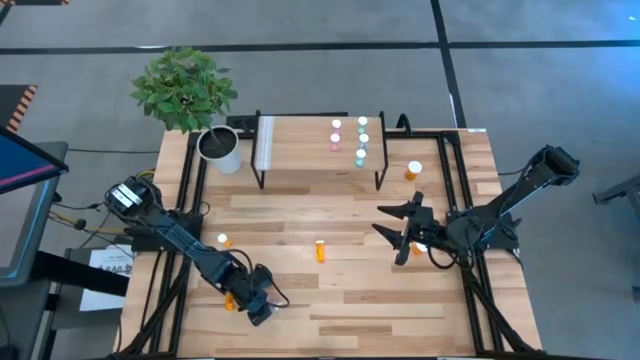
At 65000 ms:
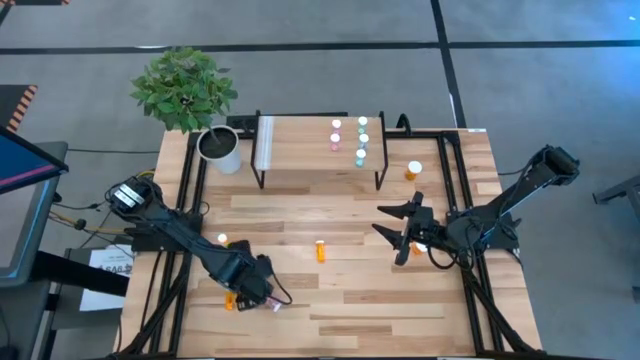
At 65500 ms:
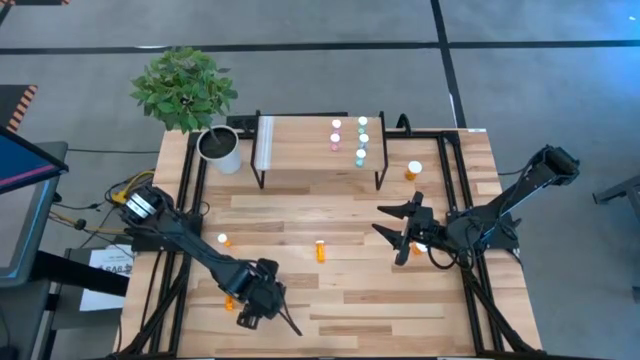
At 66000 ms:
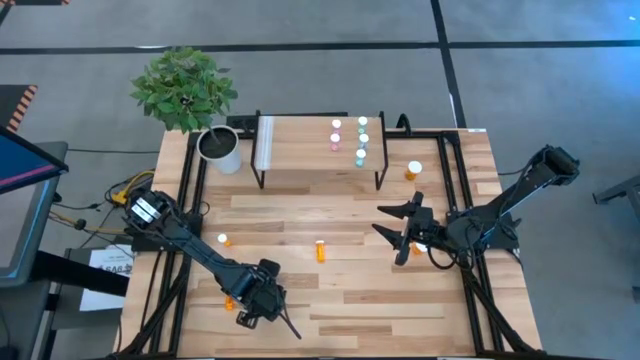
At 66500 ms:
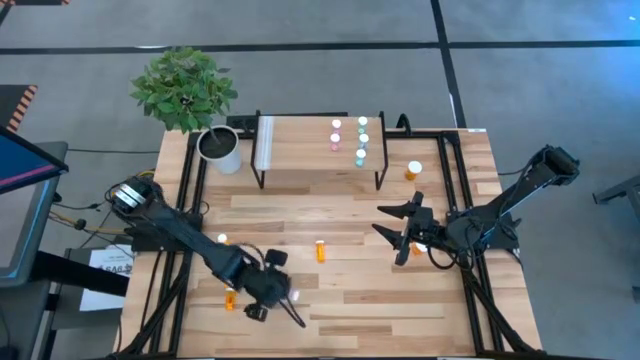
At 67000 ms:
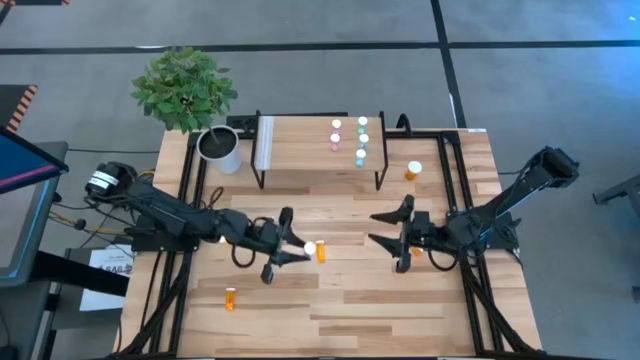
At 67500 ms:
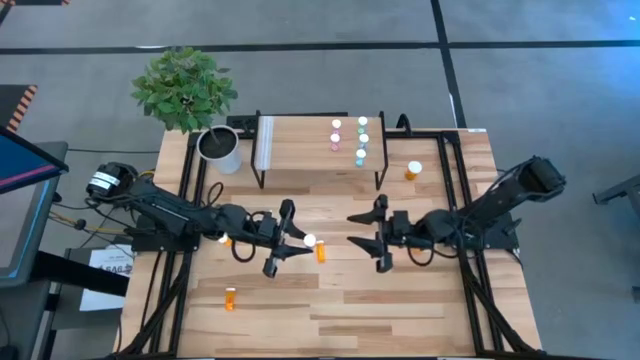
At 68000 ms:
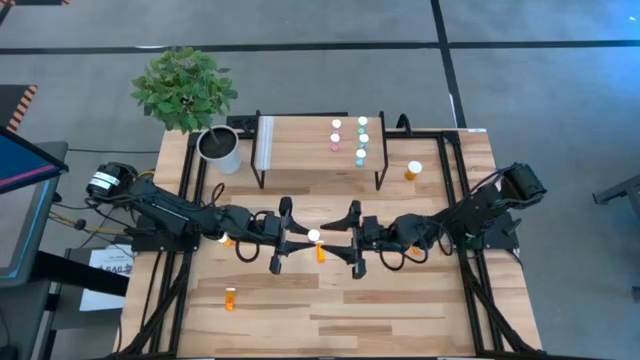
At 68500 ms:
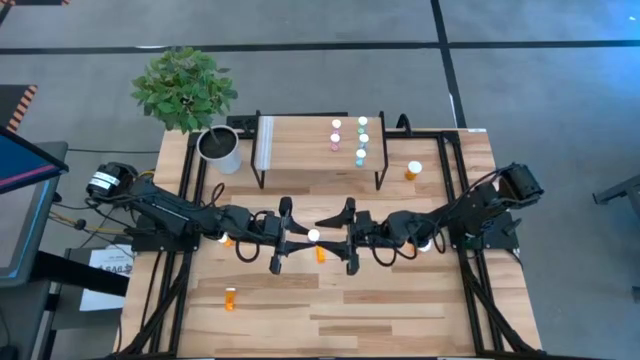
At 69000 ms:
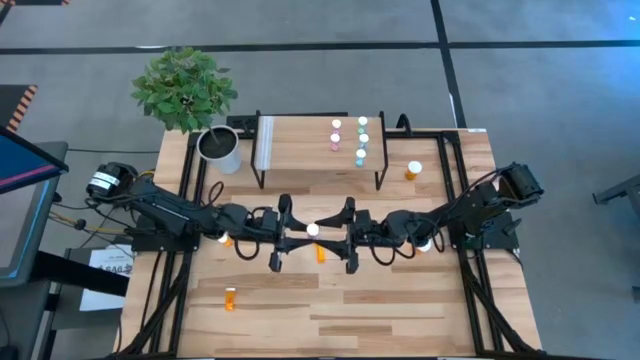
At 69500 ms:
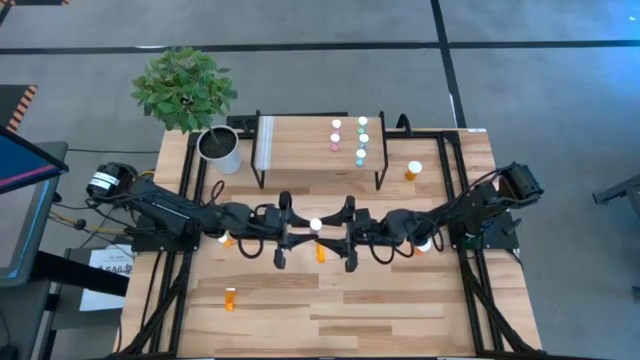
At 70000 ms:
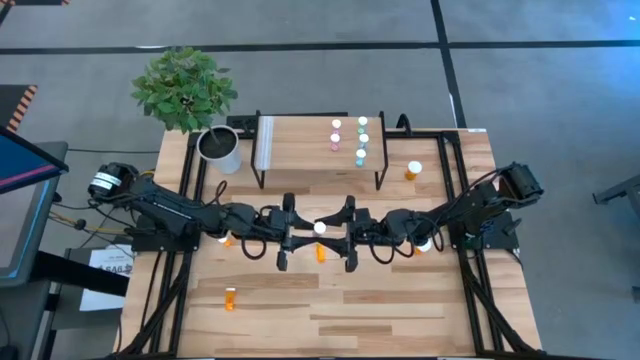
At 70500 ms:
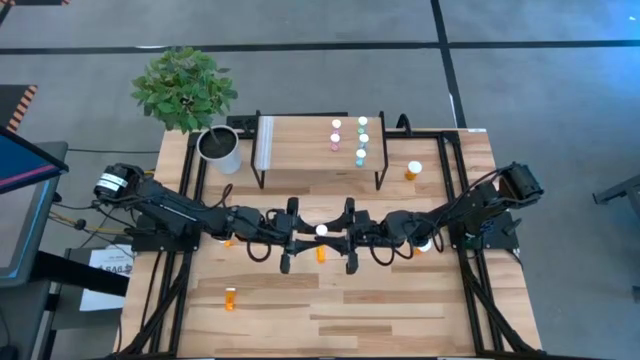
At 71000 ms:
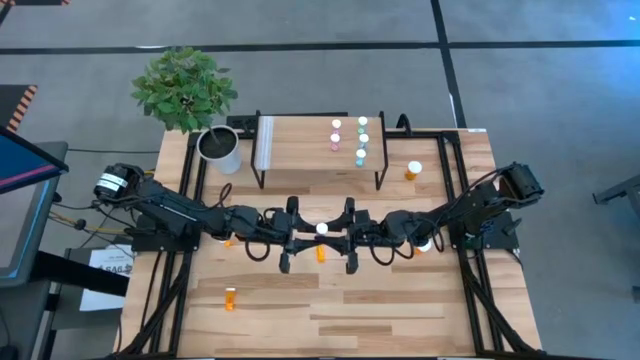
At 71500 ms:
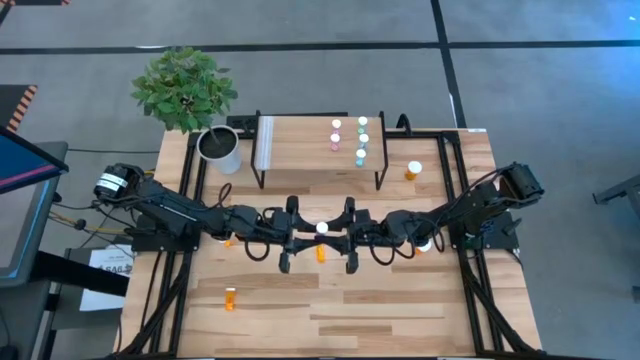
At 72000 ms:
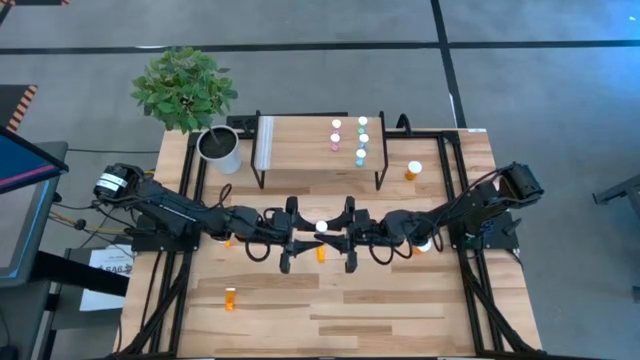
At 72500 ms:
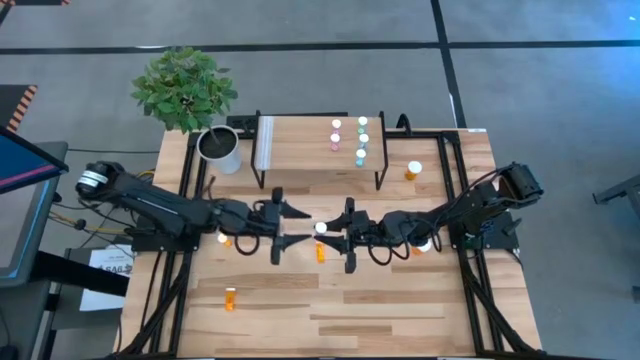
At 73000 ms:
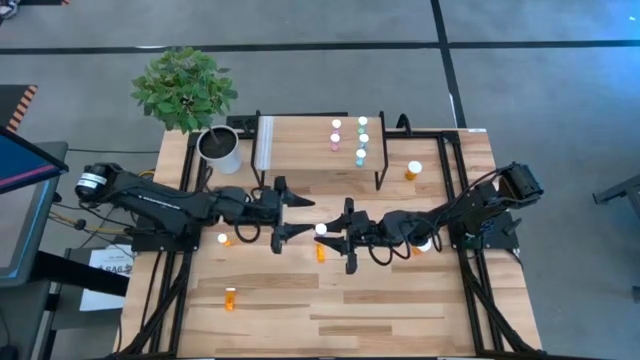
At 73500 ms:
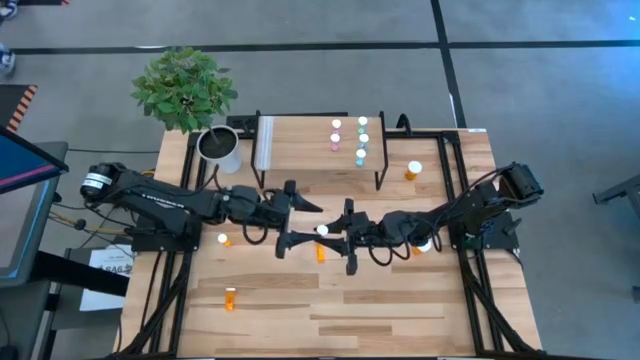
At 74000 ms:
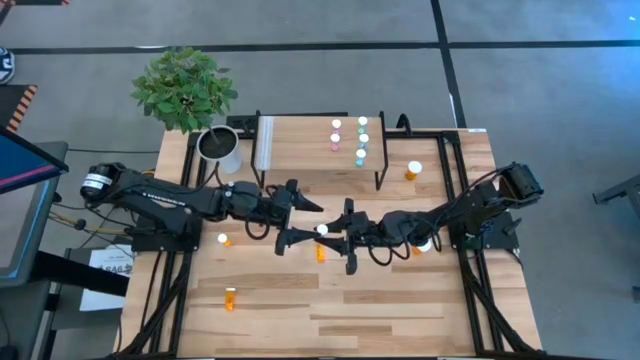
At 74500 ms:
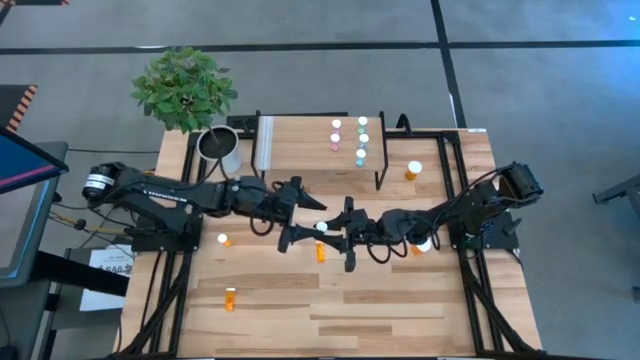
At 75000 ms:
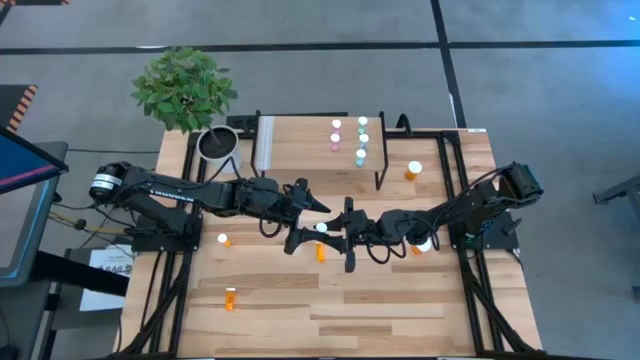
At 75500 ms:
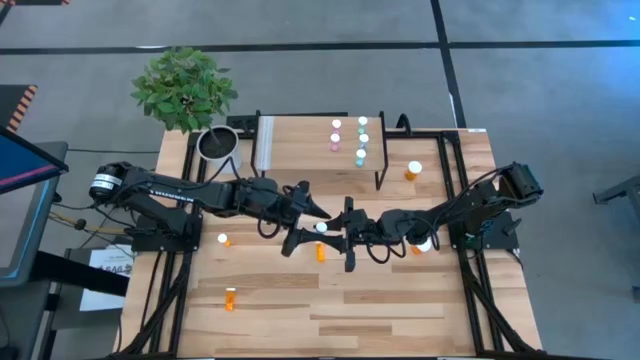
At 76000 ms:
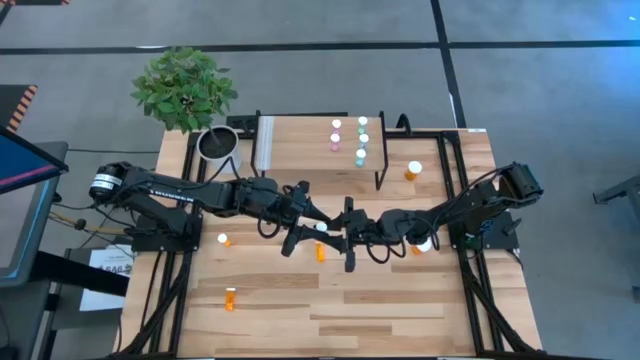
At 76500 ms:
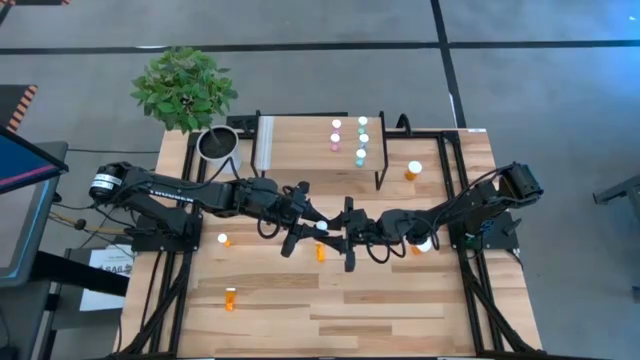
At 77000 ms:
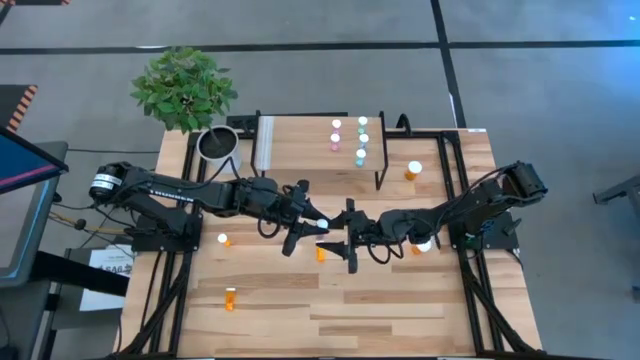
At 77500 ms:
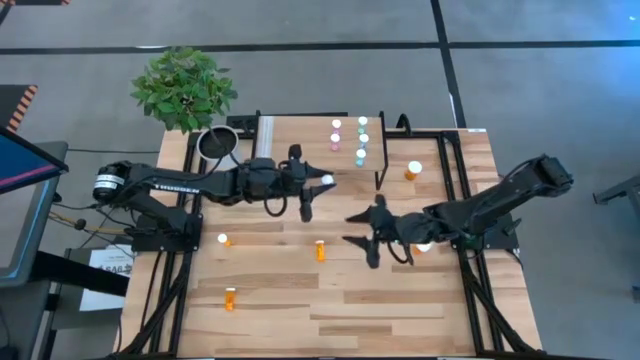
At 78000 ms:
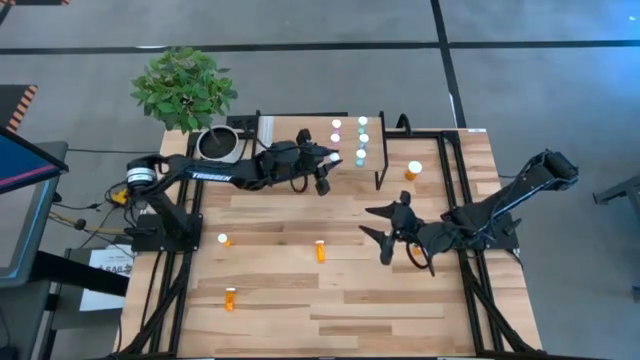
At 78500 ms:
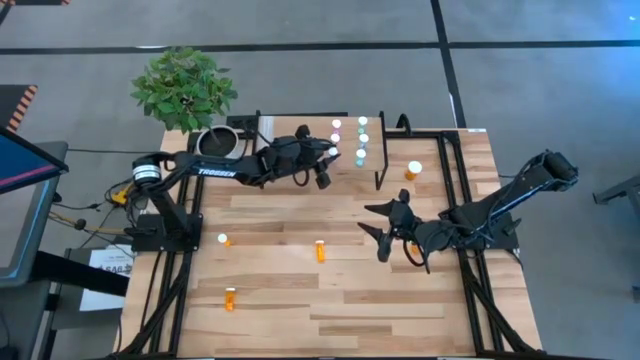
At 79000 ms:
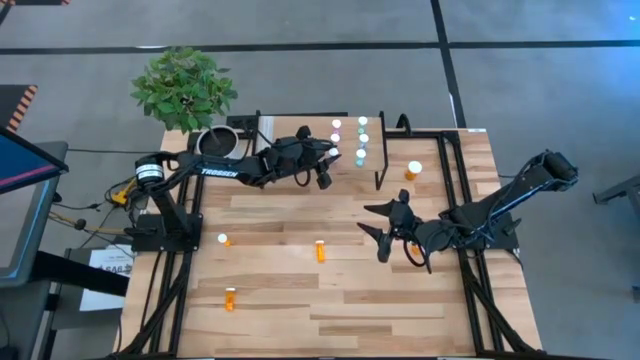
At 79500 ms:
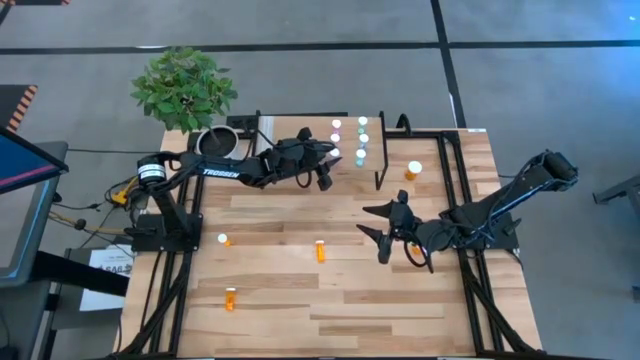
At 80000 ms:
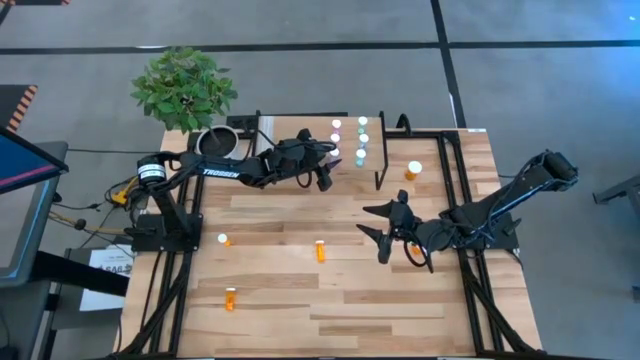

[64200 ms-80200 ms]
Task: Pick and place medicine bottles onto shelf by color
Put the pink pill bottle on the shelf aligned with the other pink pill bottles

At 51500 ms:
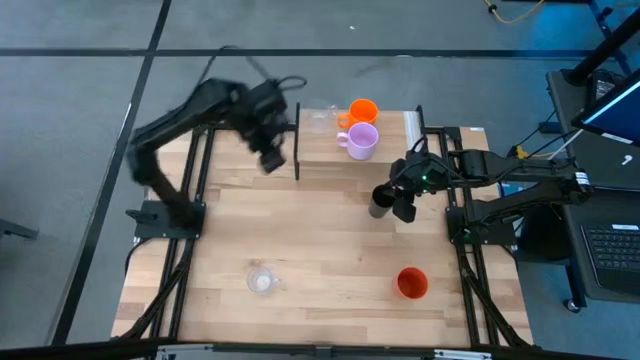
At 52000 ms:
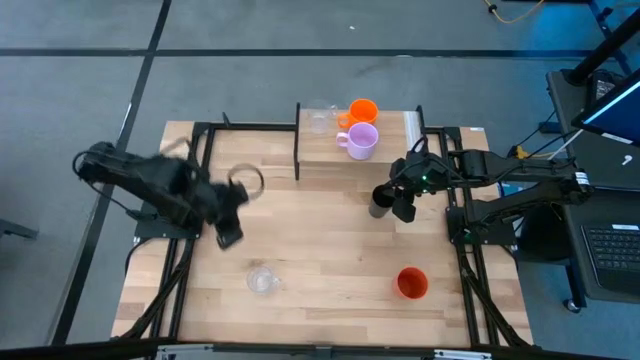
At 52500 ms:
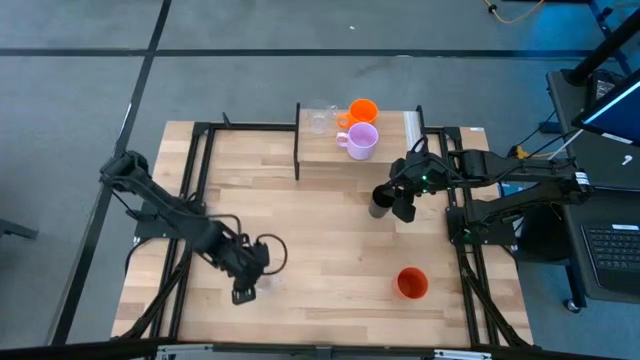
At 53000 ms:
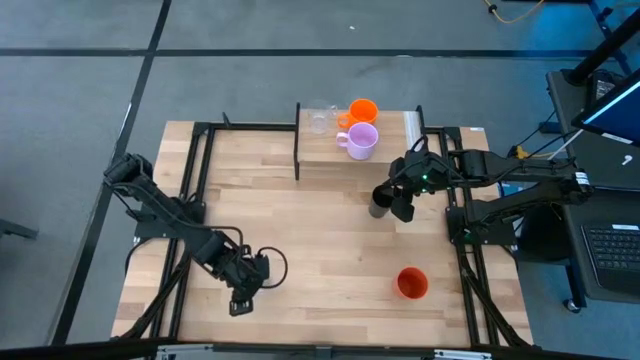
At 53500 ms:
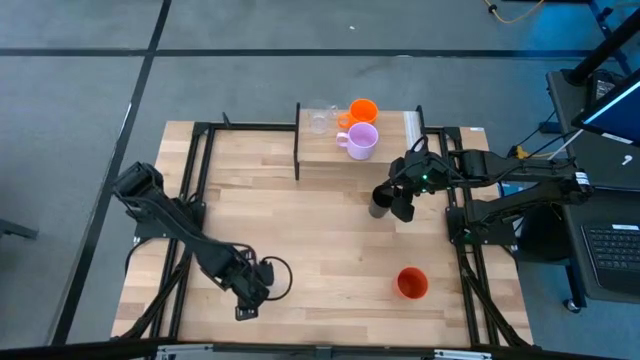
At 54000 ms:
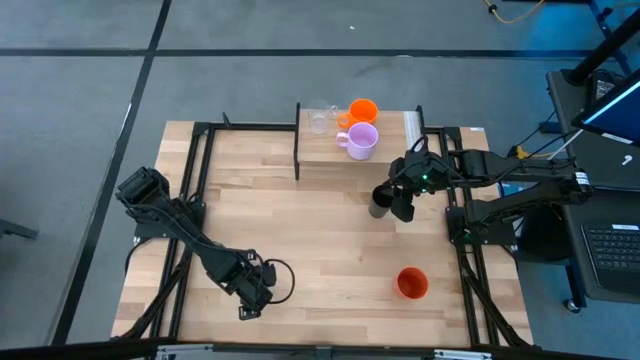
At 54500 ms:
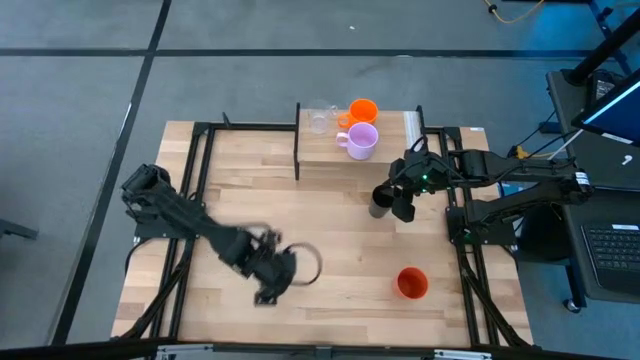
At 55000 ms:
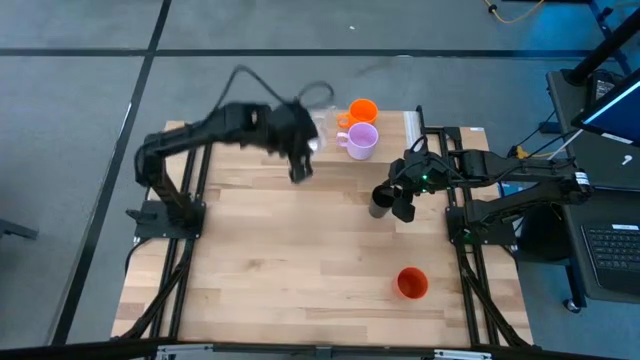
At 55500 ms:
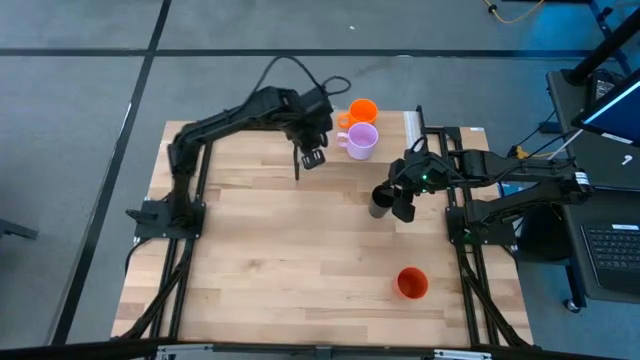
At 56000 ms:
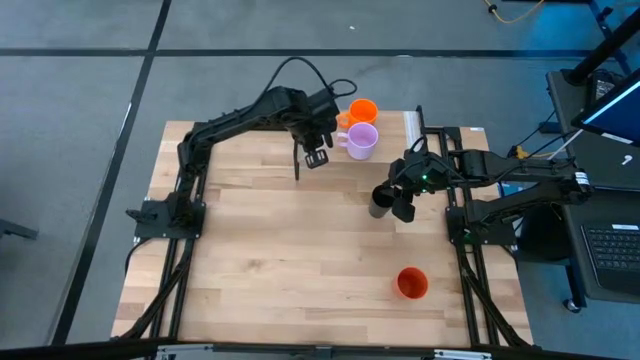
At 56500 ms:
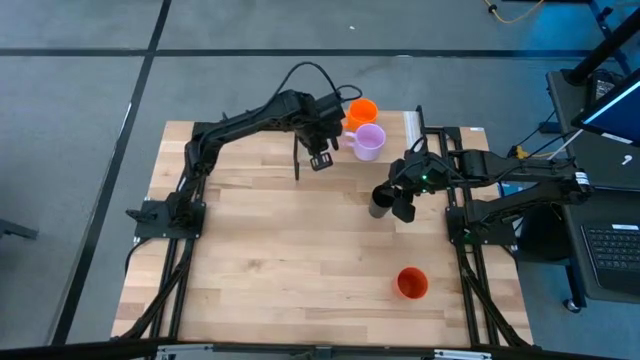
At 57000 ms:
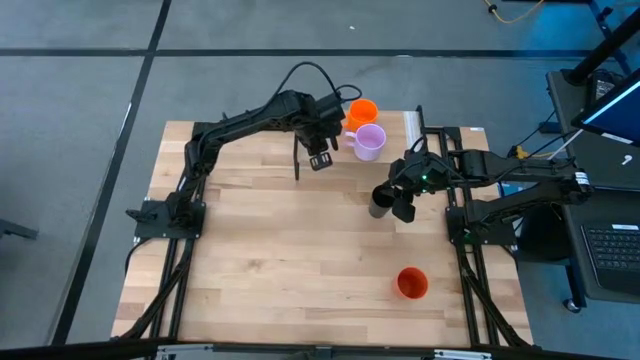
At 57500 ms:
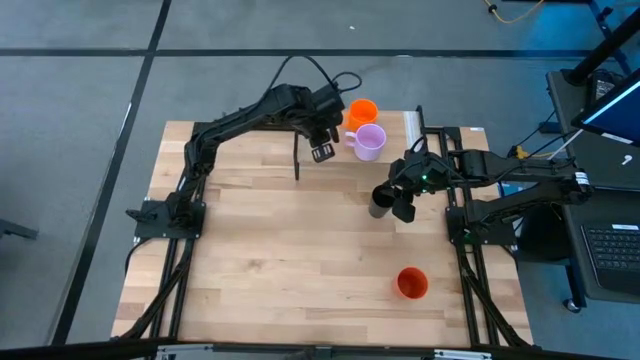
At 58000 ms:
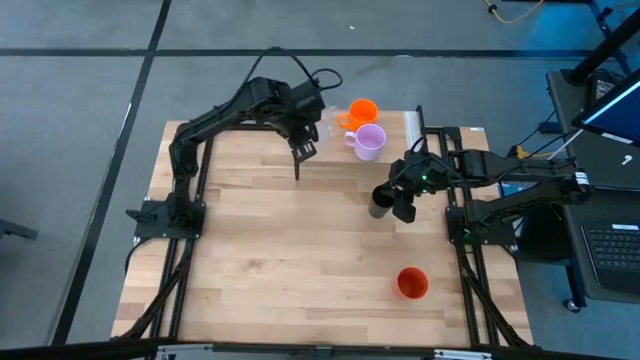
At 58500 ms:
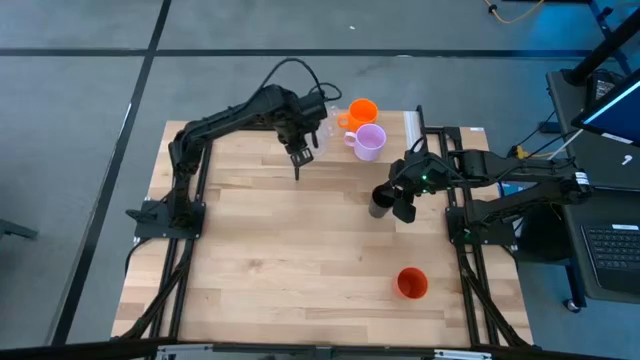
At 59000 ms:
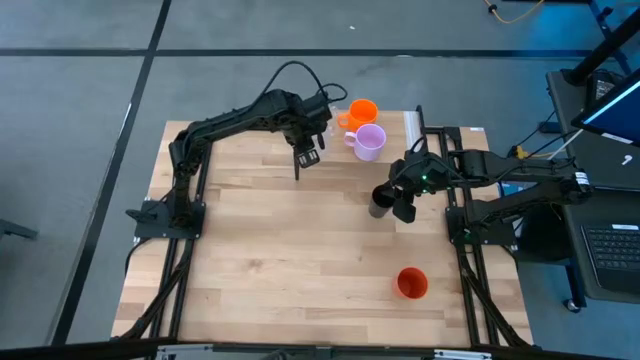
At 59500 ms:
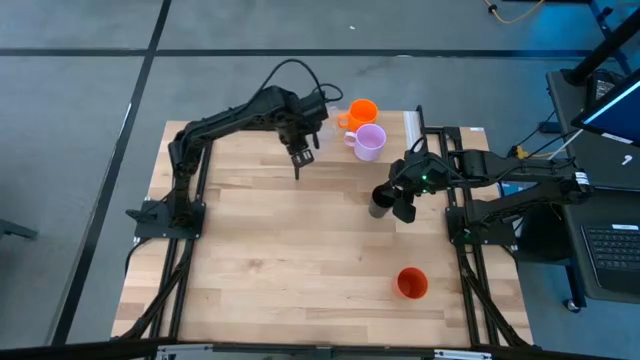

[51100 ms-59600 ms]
Task: Stack small to large cups/mugs on shelf
Align the transparent mug with the other transparent mug on the shelf
